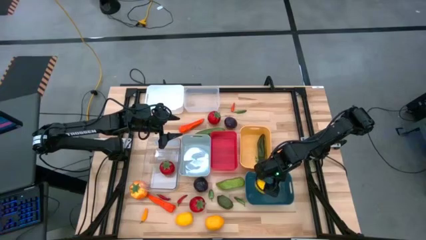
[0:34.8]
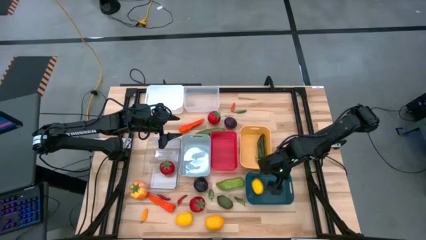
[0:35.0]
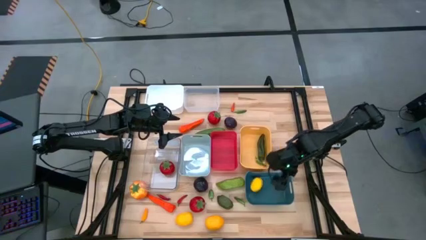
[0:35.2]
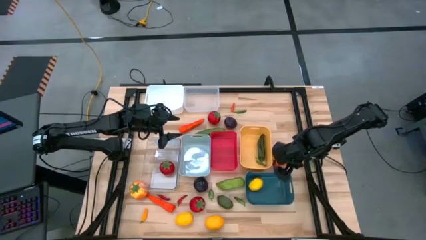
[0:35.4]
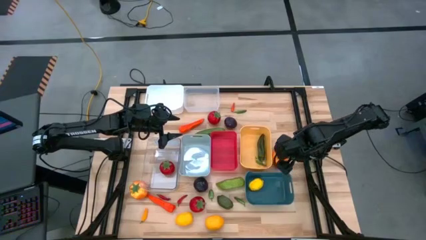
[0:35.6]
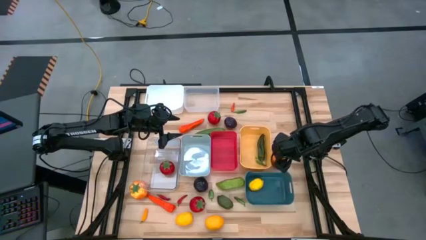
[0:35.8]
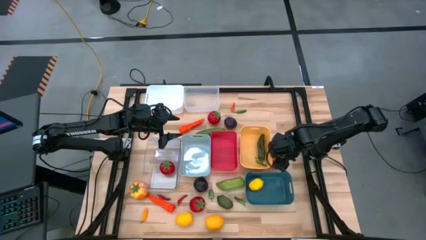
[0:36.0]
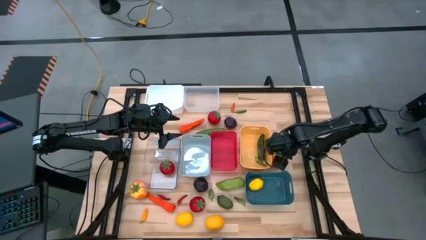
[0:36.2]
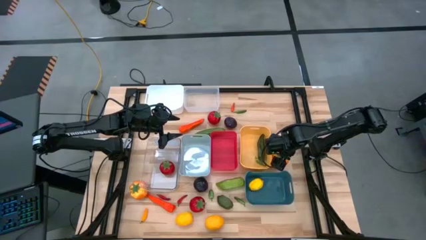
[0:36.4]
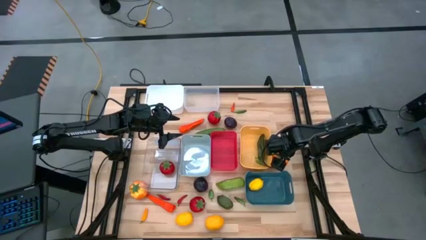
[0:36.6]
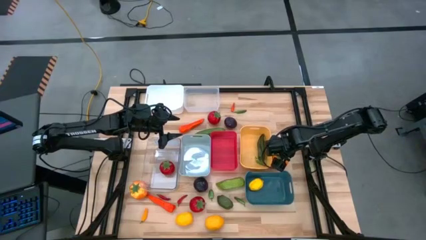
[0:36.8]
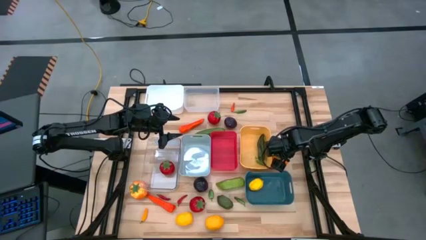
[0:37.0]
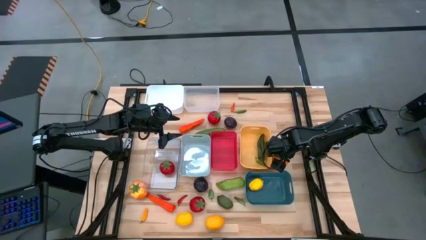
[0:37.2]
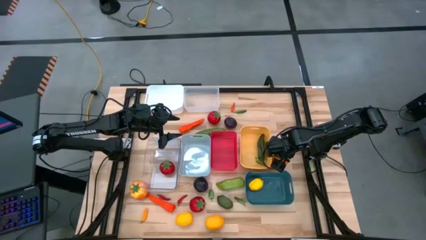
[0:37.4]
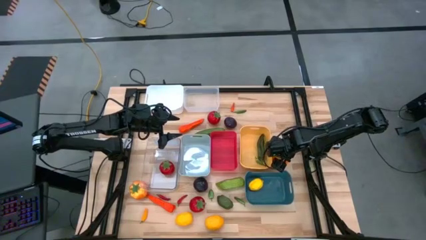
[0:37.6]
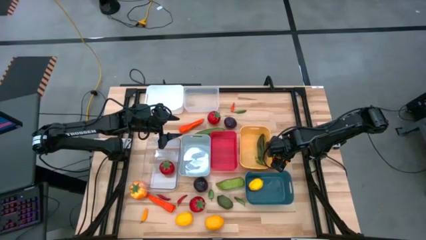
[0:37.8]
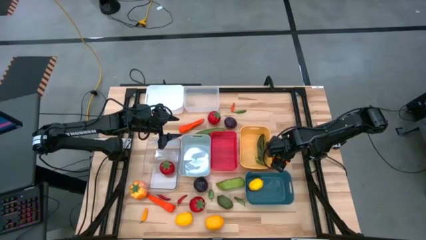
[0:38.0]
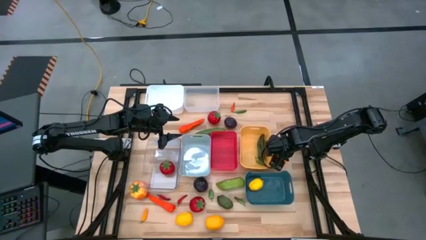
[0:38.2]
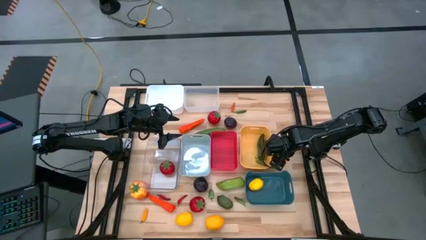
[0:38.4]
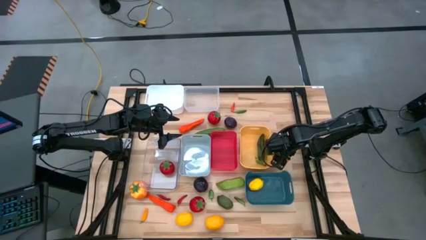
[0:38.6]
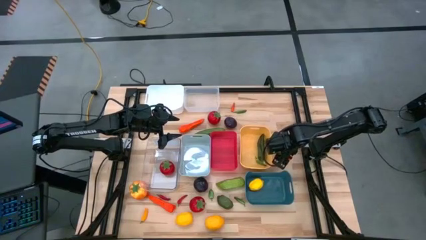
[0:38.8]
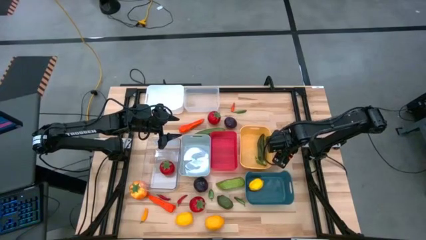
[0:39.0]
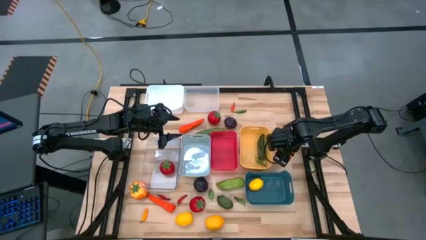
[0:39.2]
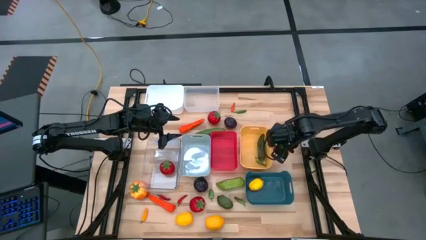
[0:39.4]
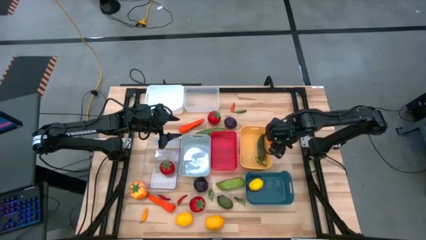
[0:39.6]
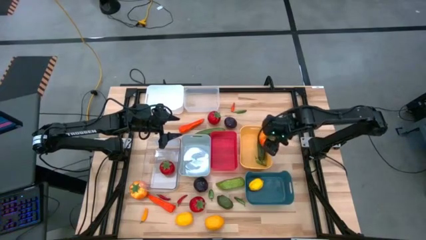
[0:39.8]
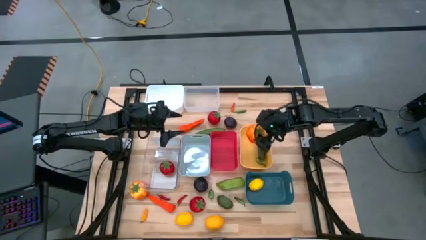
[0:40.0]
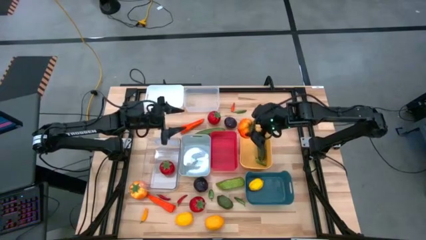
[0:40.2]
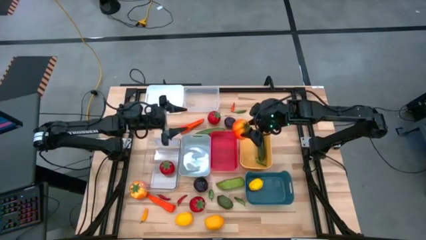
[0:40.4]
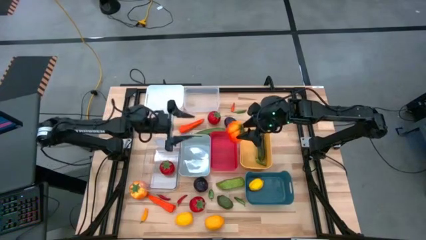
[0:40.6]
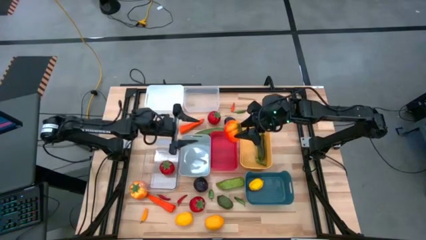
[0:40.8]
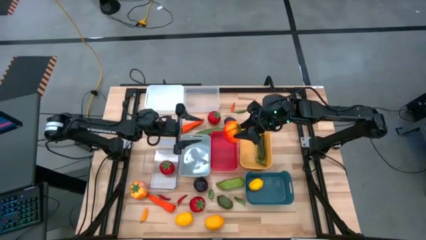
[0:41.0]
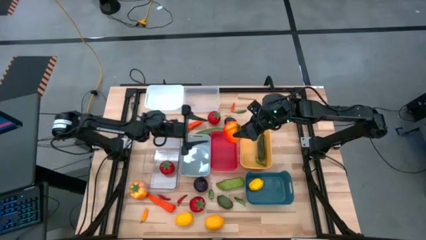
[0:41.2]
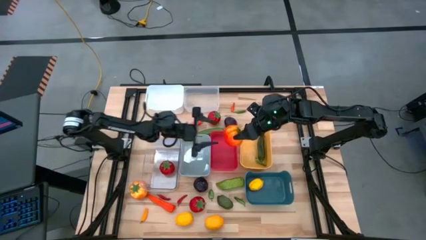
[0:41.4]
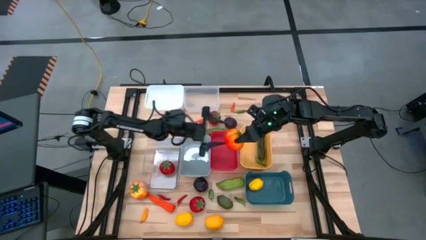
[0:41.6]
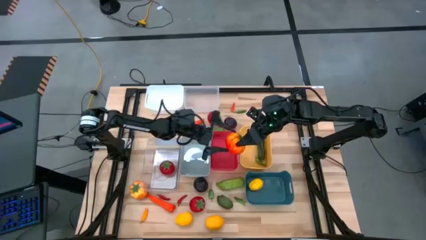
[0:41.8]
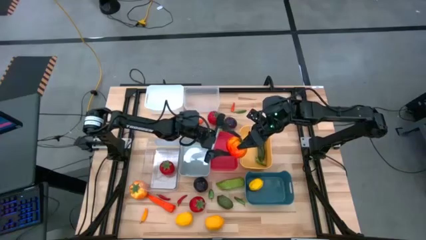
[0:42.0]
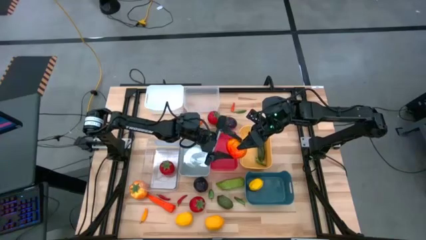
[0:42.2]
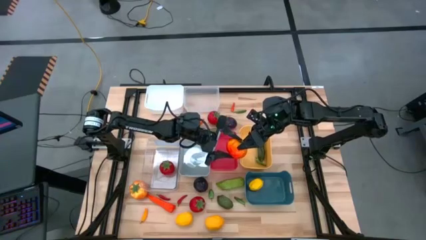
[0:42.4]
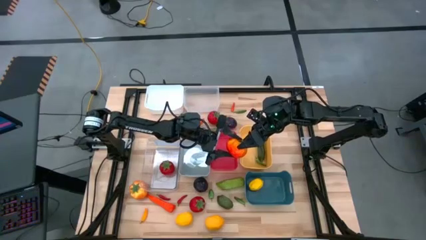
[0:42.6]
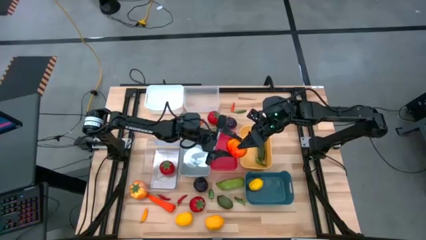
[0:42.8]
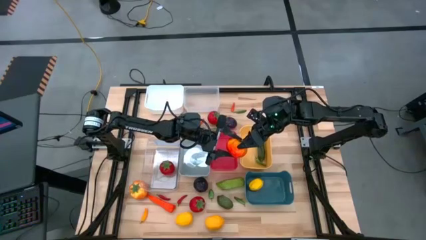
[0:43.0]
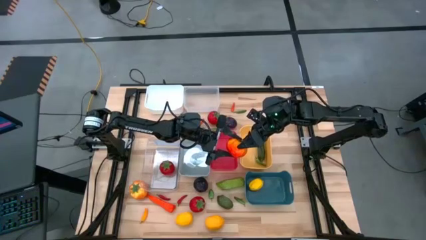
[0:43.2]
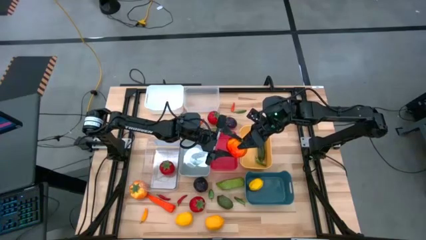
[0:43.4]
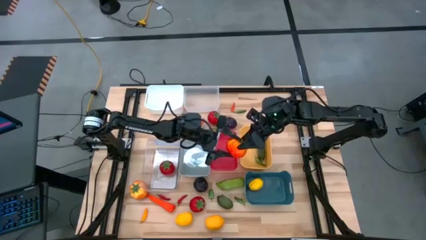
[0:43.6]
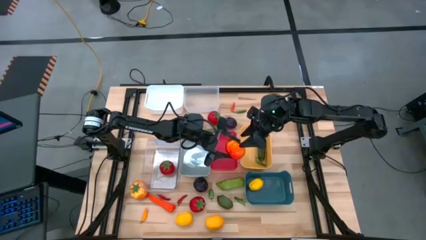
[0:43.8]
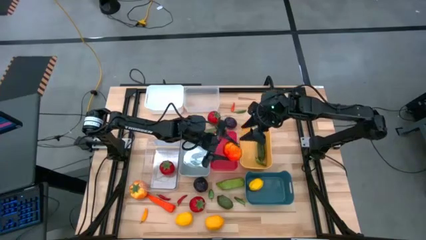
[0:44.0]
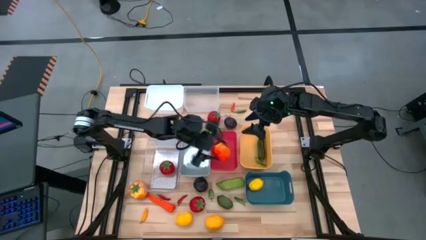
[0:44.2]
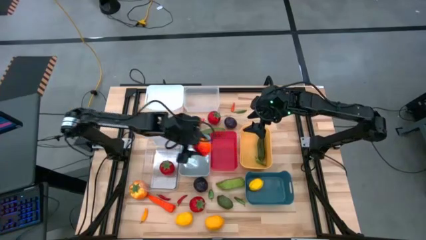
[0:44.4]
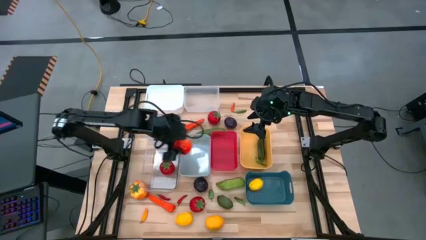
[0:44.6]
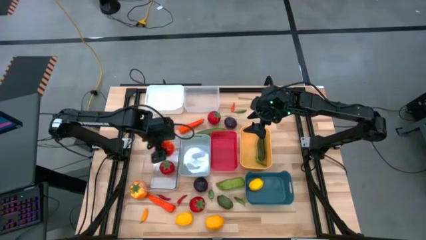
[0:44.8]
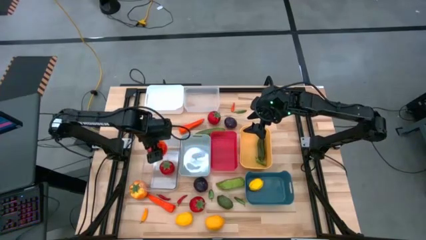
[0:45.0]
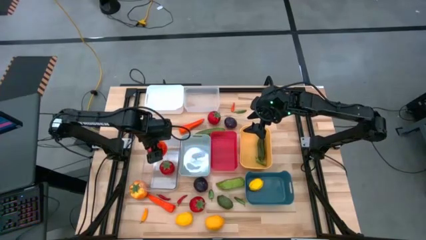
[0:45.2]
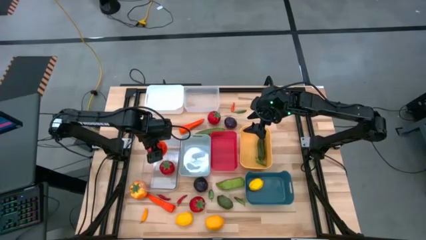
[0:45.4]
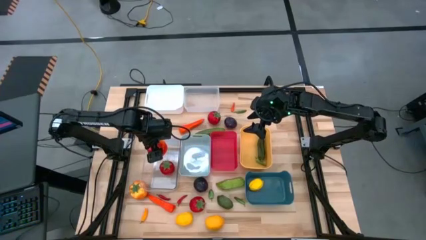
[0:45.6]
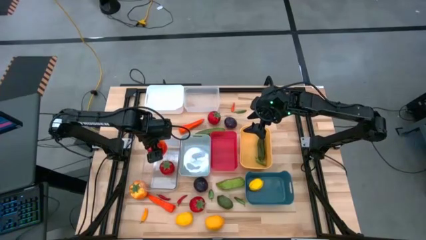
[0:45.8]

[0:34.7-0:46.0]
Task: Sort produce into baskets
Put the orange tomato into the bottom transparent bin

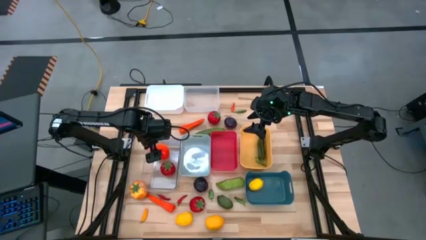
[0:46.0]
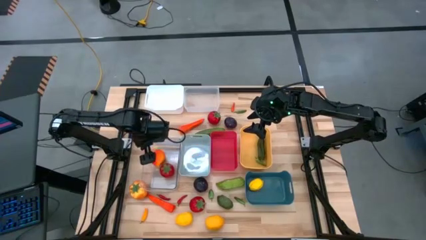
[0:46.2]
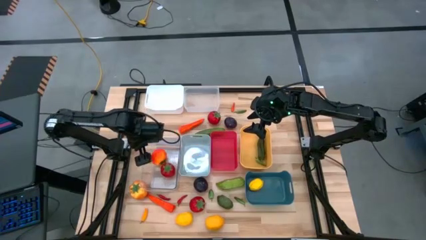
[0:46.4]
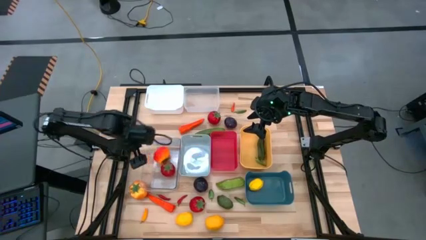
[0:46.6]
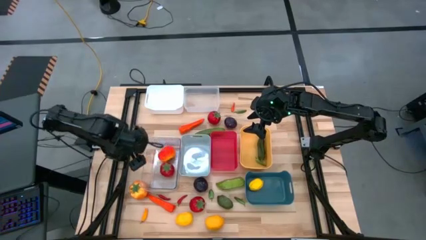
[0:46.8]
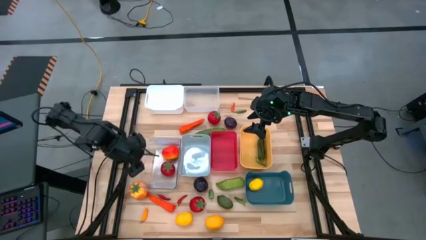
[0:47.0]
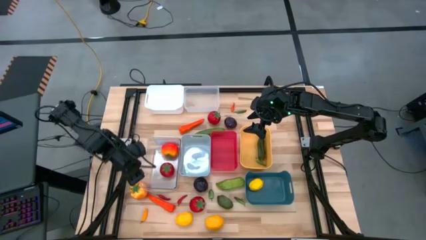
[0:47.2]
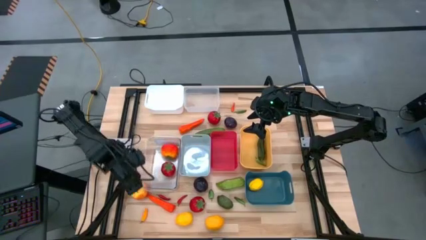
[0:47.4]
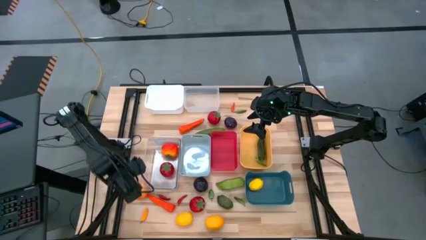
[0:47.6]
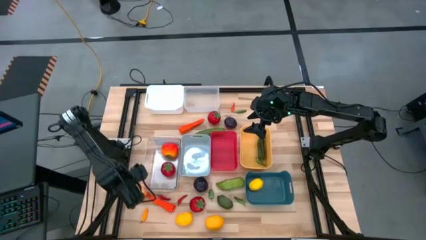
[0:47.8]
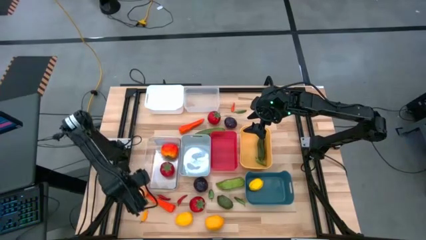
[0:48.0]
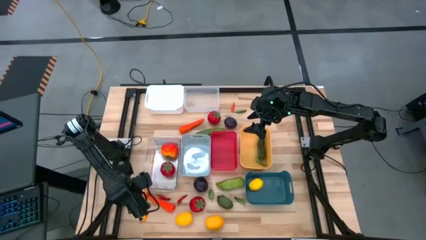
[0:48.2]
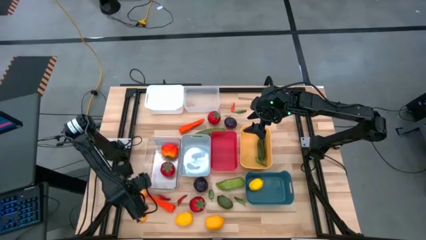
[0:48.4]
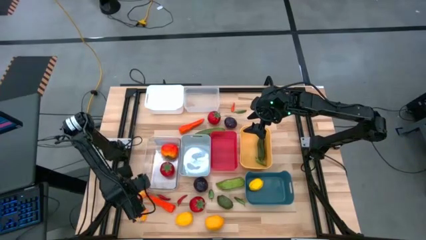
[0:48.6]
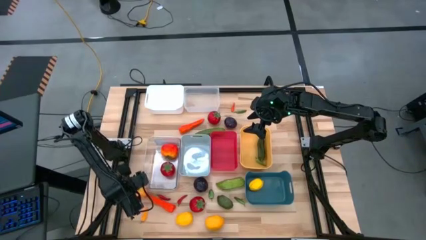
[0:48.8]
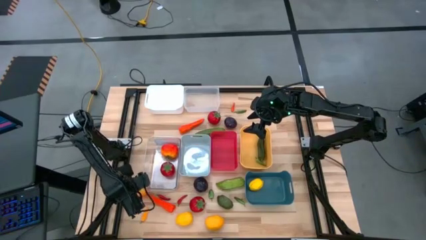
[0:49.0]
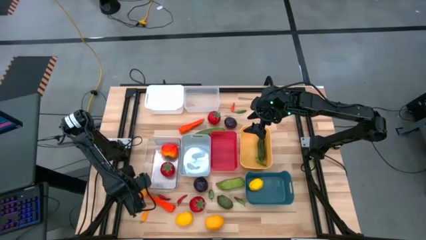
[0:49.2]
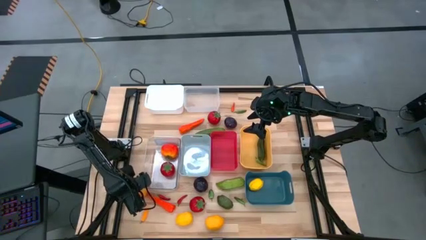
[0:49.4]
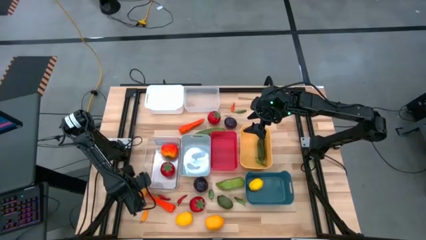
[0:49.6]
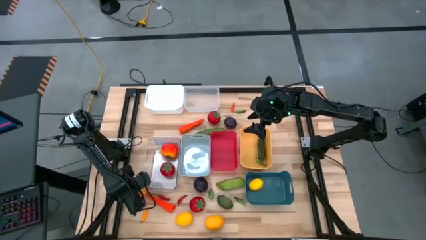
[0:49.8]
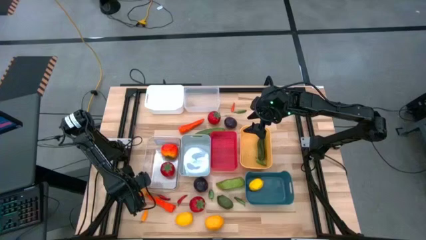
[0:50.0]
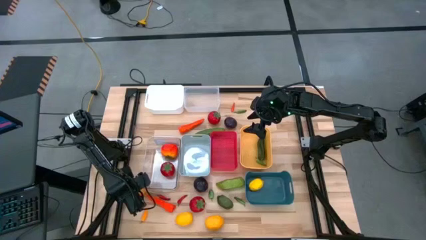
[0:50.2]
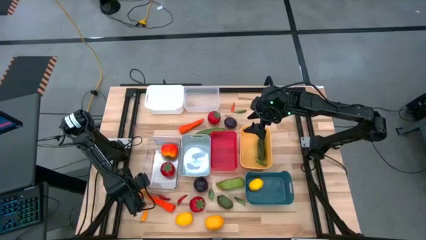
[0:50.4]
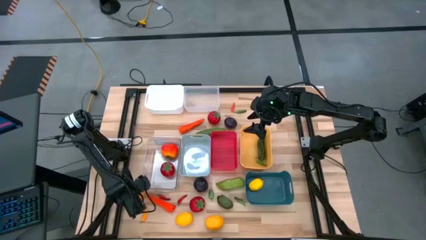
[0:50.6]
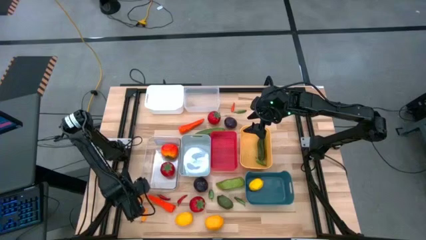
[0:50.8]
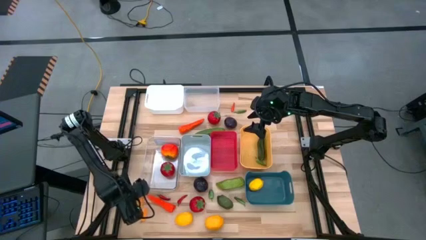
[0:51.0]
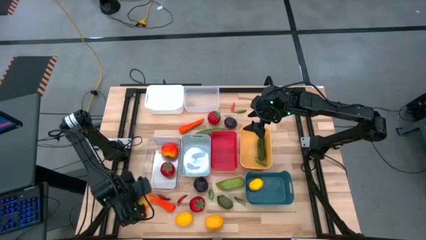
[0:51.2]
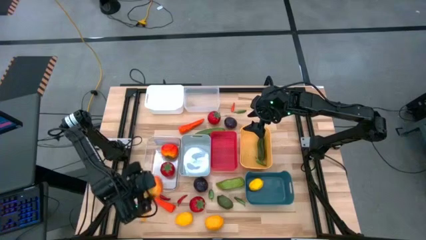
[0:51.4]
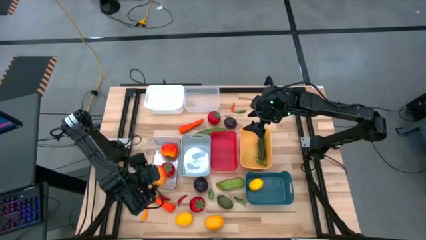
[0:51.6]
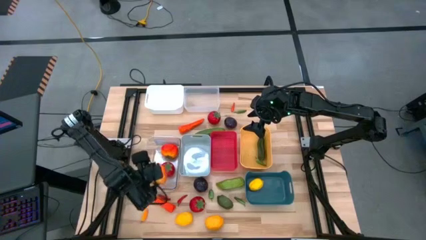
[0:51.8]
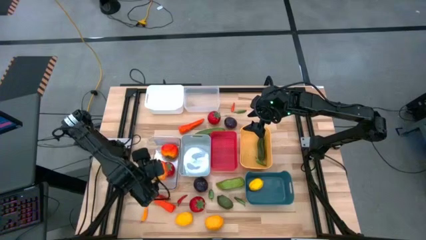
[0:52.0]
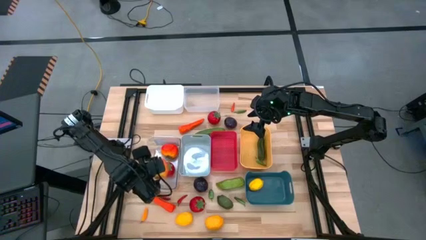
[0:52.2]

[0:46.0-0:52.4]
Put the orange tomato into the bottom transparent bin
